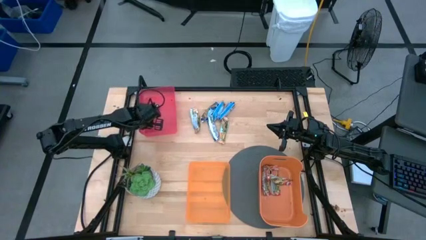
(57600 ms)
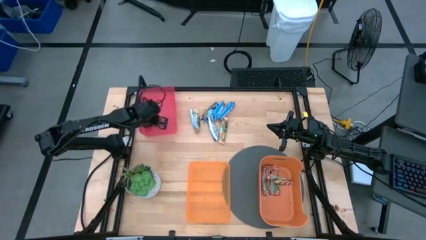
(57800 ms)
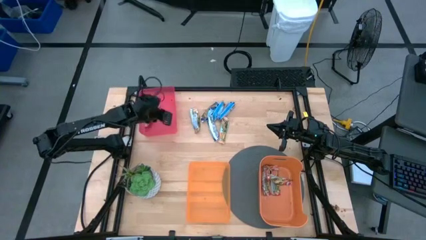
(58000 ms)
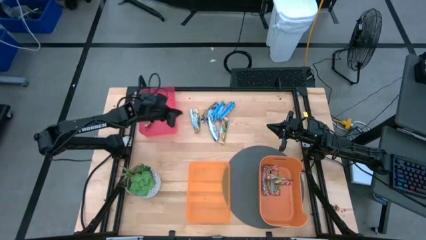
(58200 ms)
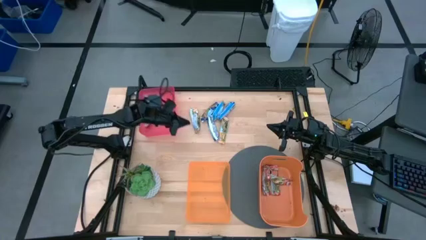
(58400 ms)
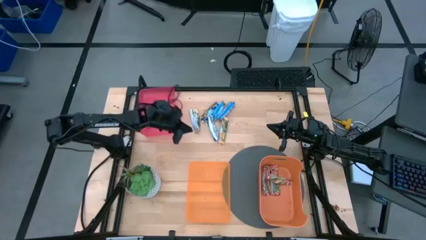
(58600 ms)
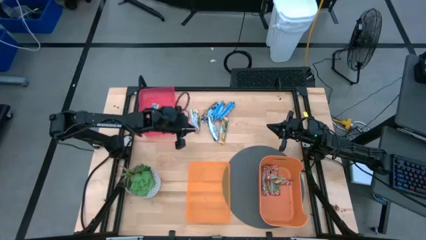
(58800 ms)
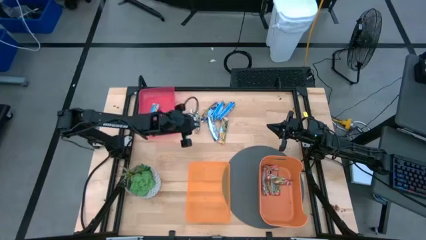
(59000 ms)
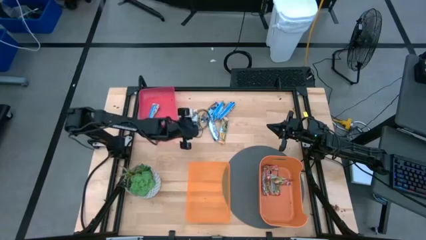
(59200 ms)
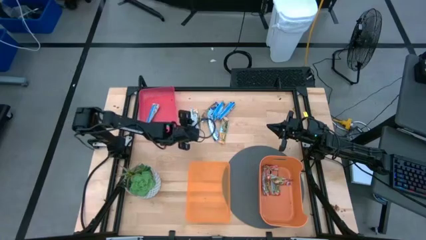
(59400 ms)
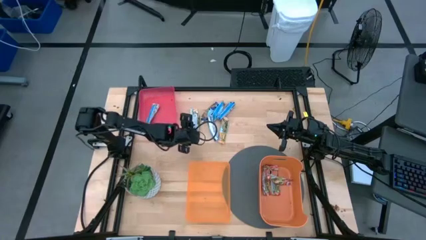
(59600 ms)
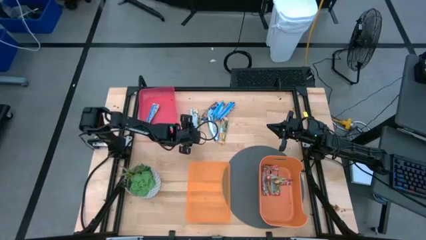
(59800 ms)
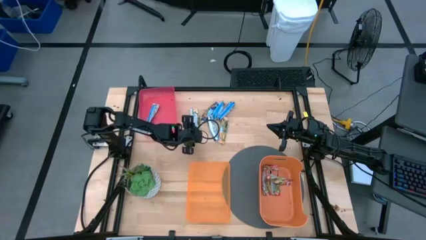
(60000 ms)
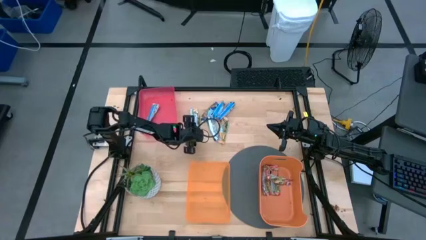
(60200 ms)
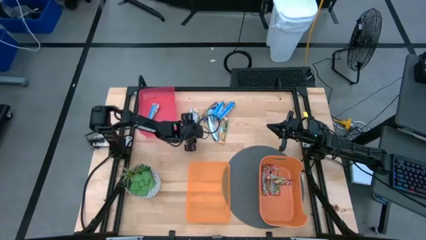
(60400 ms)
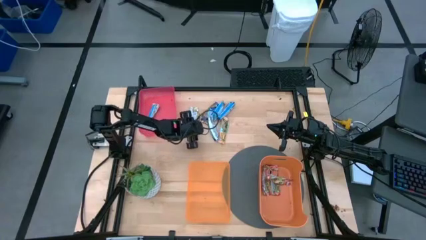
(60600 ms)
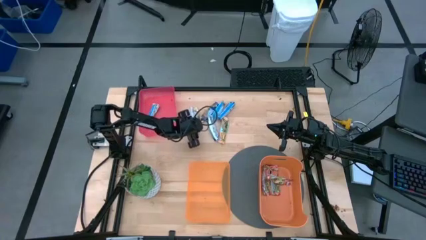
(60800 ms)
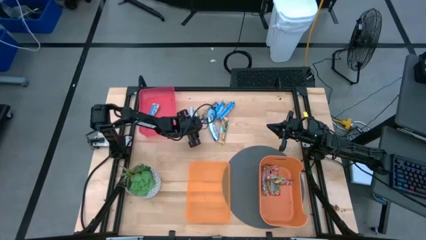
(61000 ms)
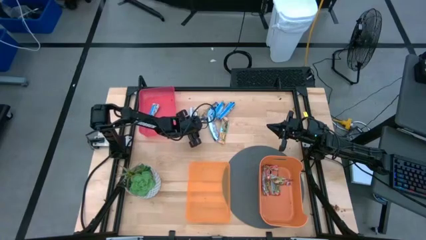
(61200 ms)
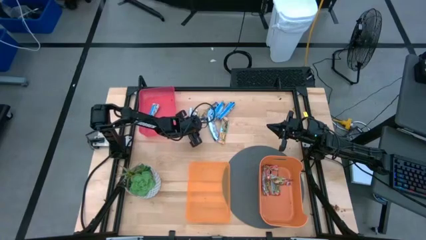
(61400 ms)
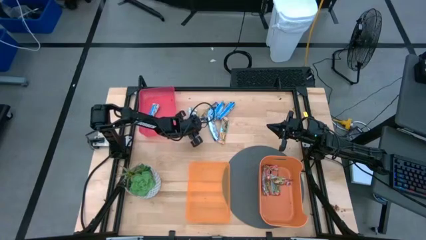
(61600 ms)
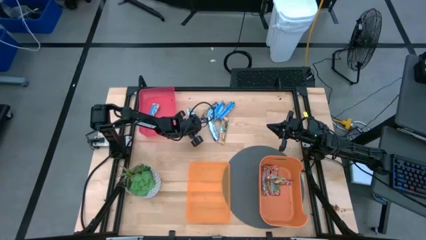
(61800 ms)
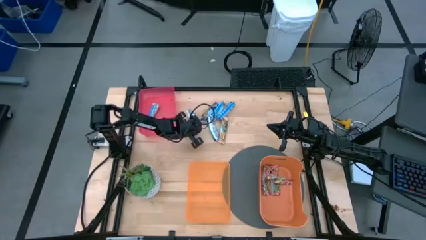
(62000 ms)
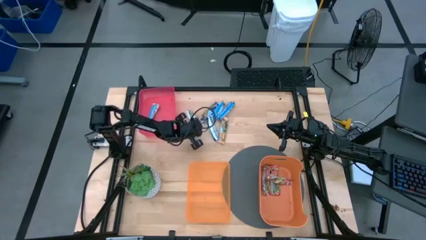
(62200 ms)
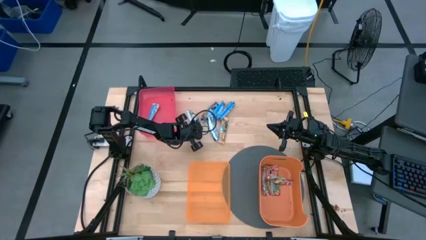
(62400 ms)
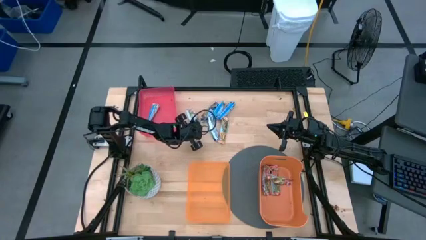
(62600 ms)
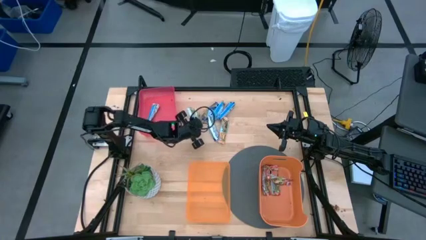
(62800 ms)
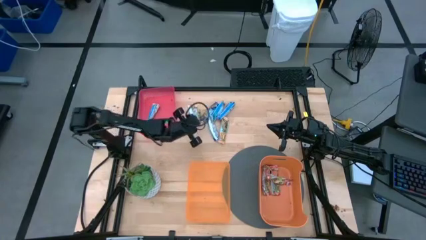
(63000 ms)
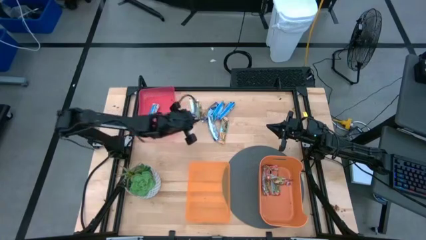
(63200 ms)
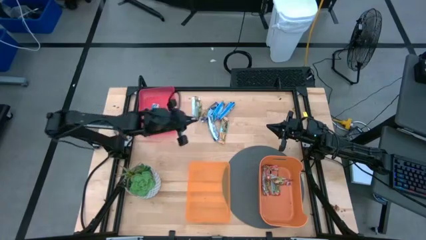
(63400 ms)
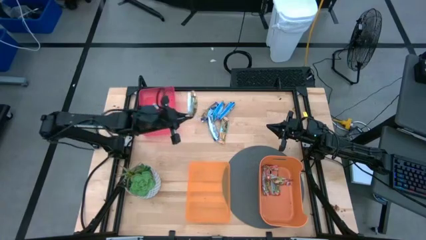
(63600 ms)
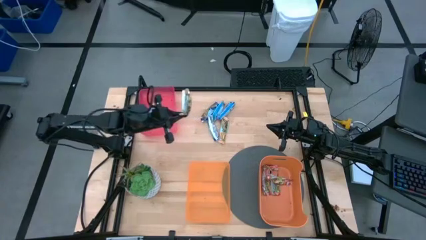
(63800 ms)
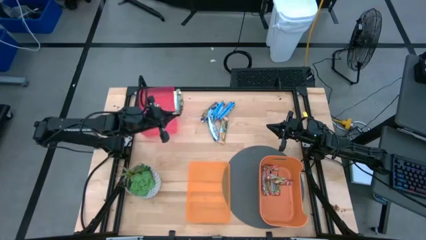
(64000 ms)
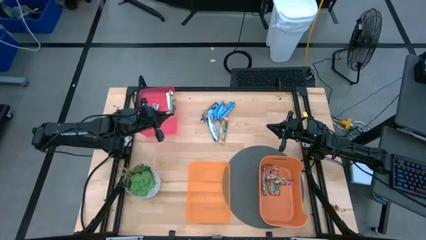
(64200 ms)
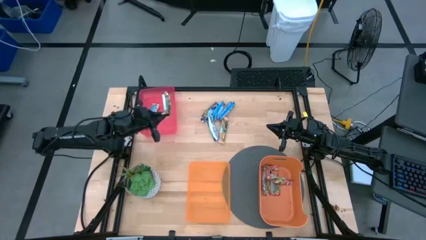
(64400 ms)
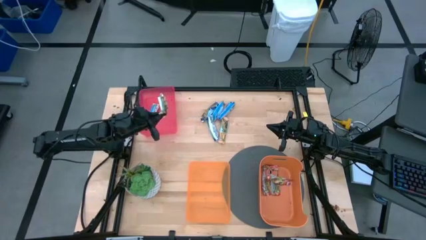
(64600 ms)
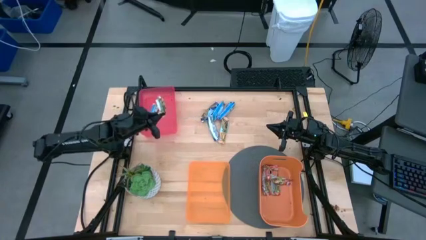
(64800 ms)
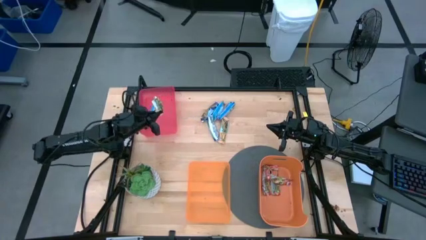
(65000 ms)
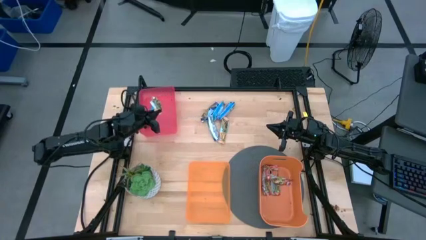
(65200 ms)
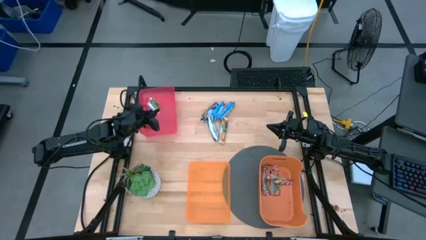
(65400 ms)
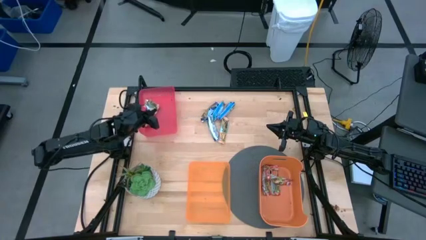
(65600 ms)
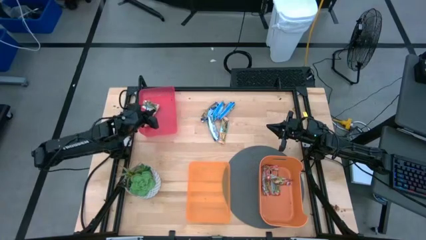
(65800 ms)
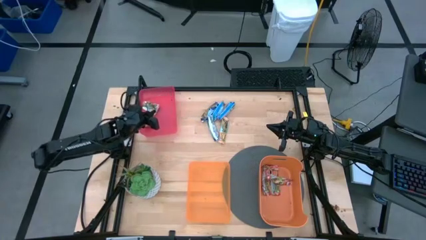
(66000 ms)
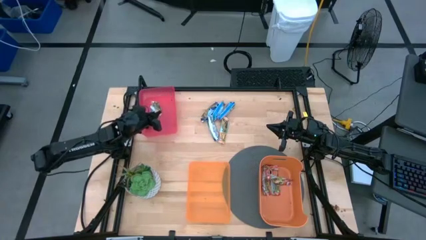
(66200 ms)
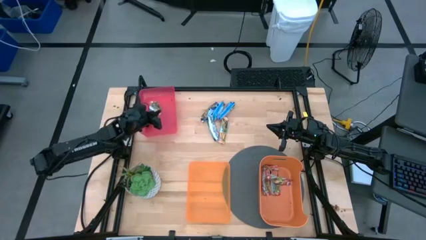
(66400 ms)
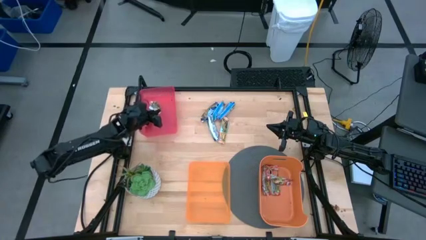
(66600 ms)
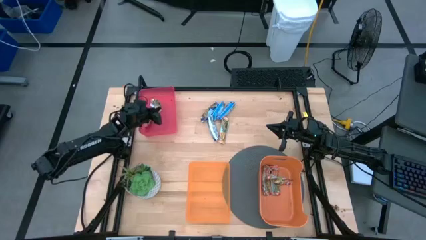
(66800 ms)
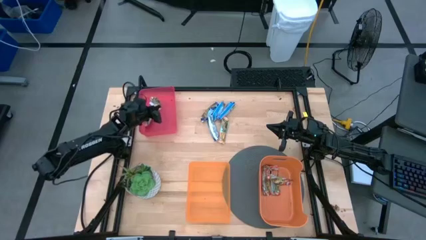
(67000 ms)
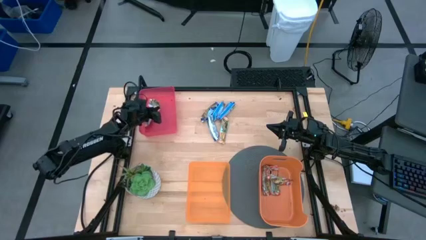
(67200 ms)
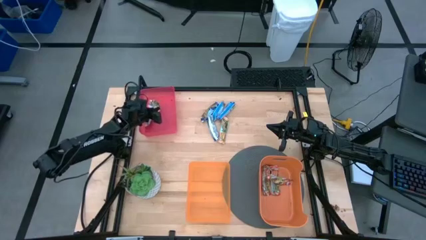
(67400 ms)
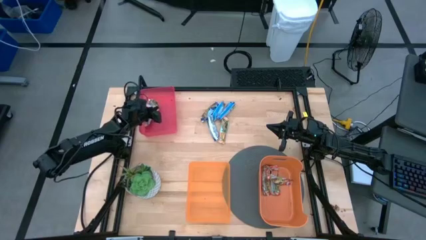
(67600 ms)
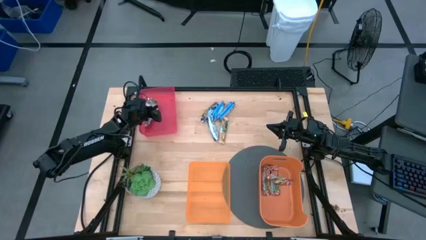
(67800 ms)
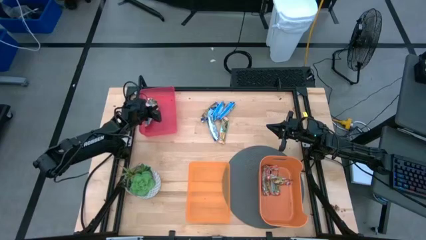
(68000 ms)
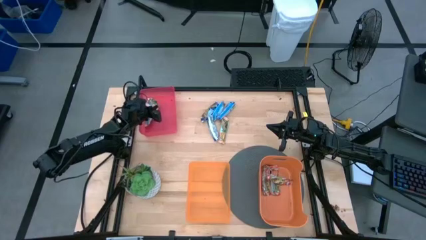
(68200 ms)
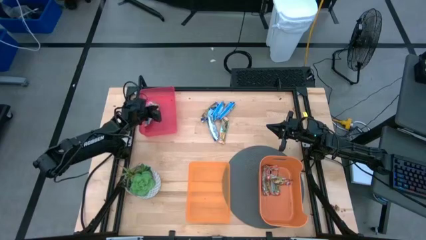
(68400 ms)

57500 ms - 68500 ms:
Task: Pick and place Granola Bars by type
Put the left yellow granola bar into the red bin

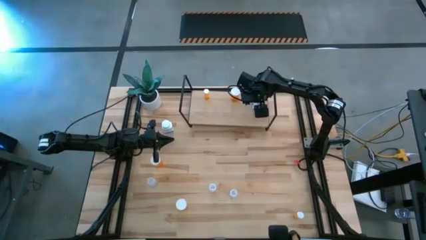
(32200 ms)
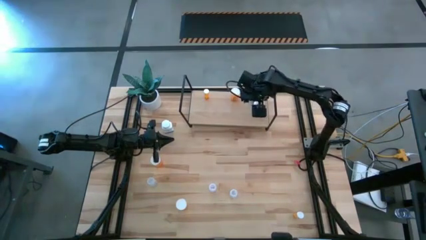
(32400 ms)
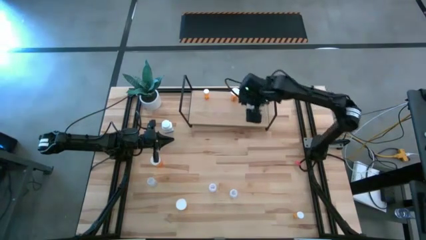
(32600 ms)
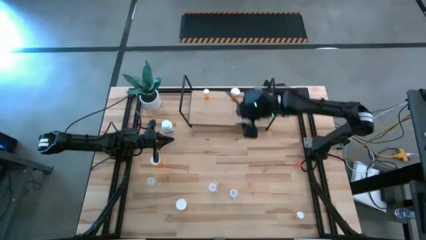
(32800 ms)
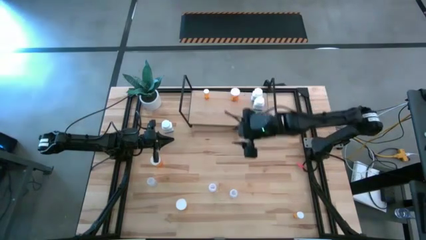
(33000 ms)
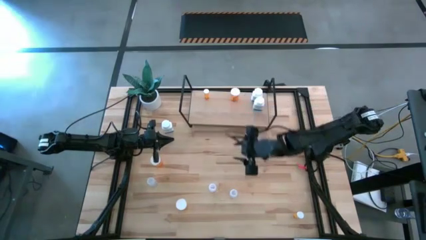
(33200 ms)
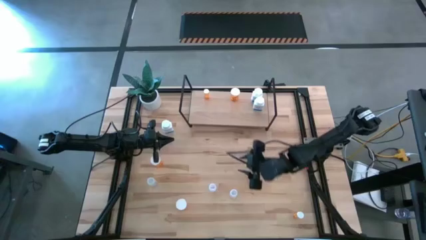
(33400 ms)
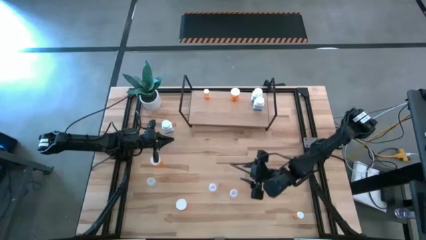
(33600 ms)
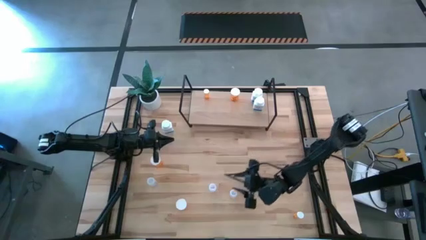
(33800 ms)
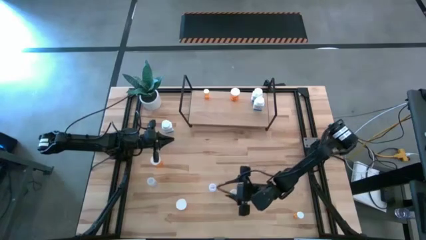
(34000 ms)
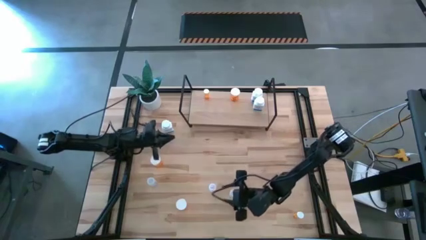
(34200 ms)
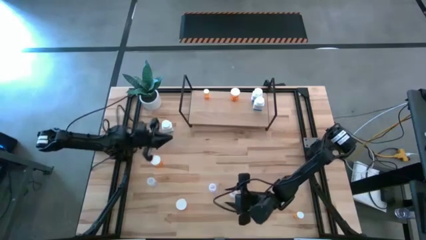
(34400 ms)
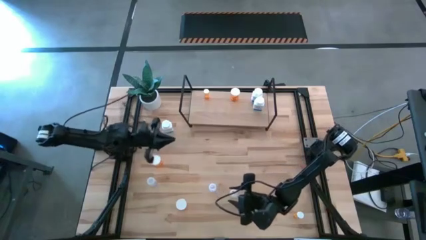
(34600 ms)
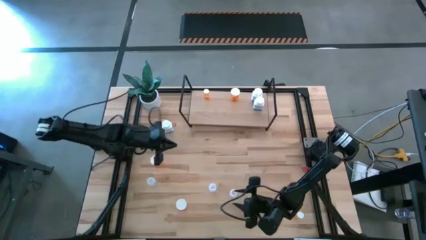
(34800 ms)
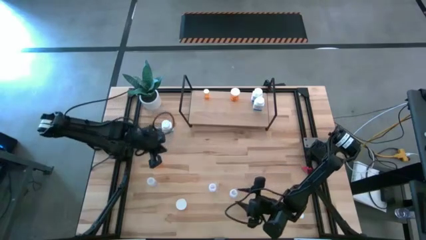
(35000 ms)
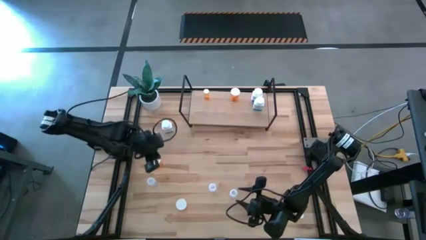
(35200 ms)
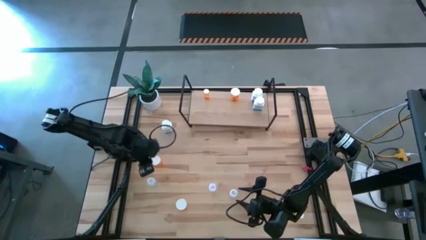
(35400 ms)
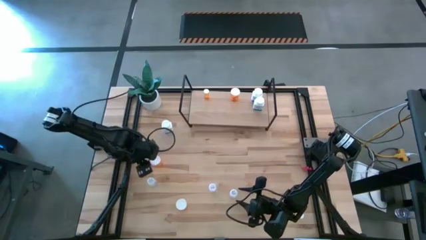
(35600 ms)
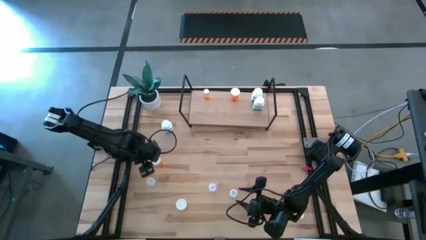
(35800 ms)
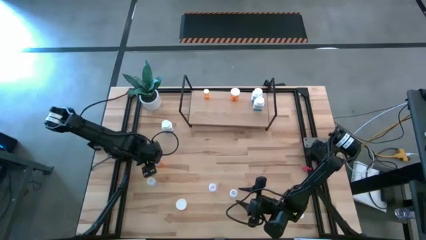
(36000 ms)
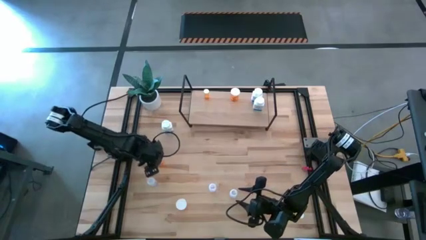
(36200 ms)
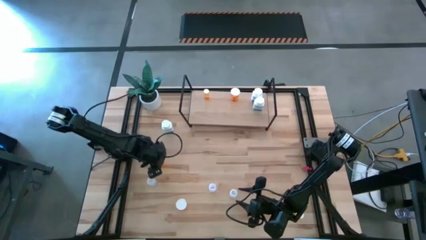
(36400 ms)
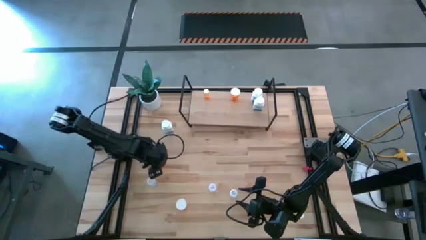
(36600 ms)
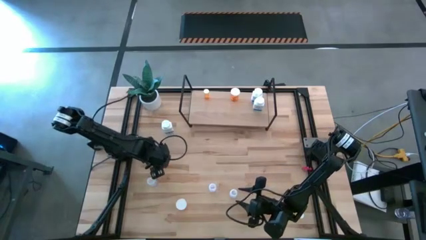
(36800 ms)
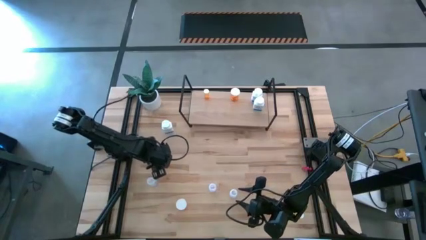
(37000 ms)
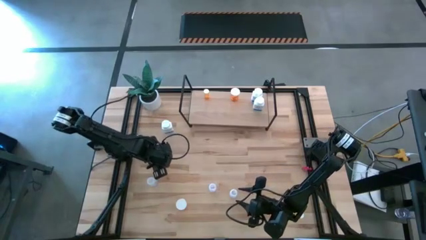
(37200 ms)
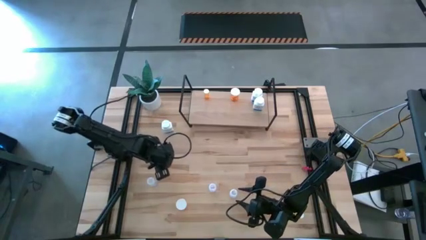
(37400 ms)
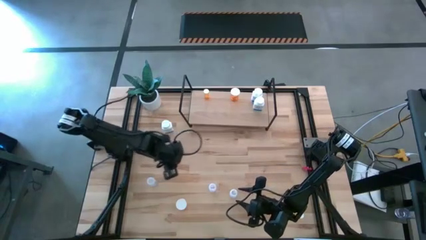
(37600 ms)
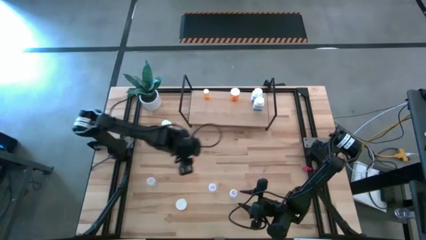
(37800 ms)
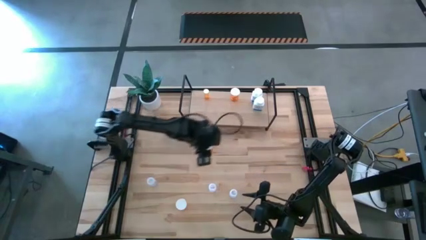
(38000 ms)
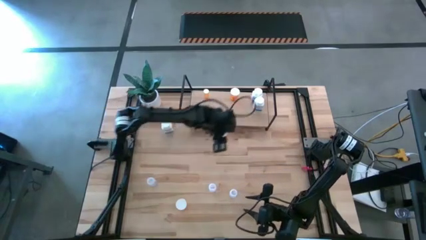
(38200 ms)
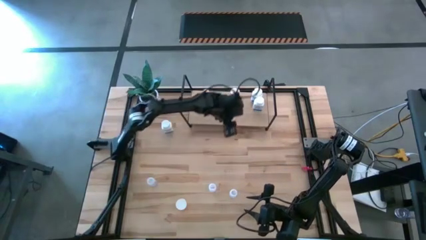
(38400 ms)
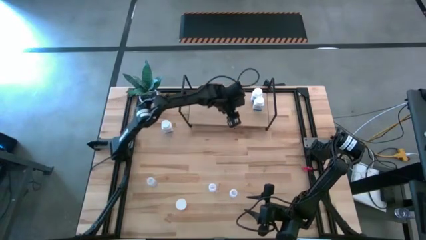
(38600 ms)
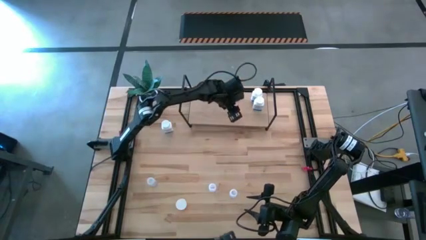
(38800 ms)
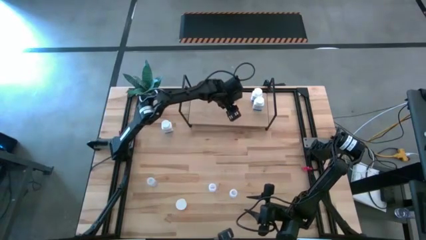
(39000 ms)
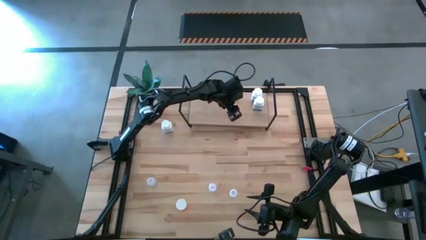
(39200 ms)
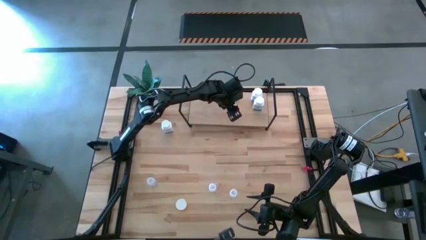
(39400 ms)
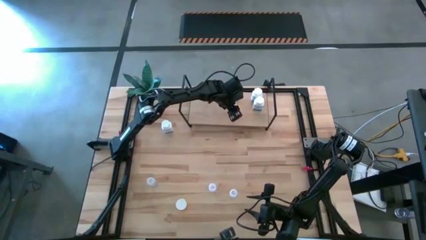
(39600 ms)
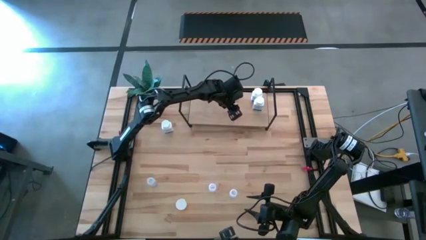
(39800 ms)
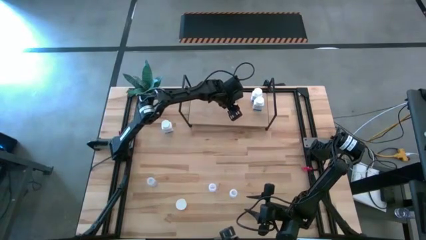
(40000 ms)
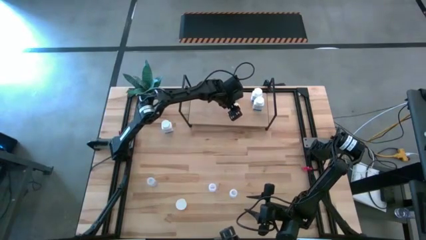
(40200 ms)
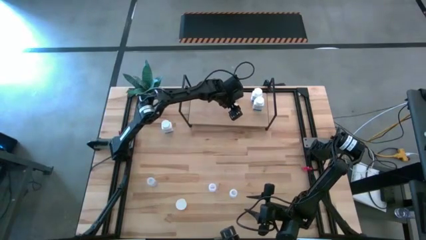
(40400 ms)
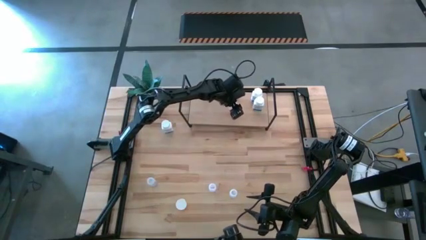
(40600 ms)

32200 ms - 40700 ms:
Task: Pick and place medicine bottles onto shelf by color
Put the top large orange medicine bottle on the shelf aligned with the other large orange medicine bottle
